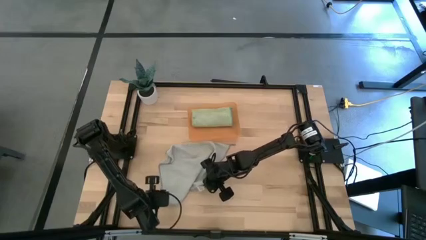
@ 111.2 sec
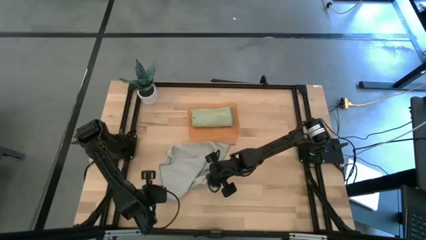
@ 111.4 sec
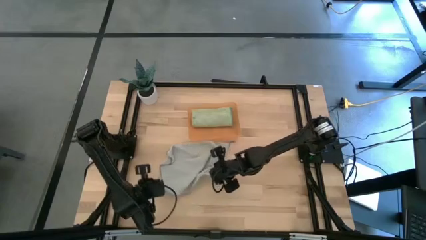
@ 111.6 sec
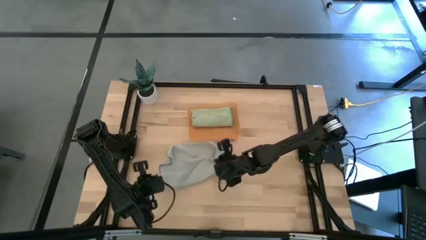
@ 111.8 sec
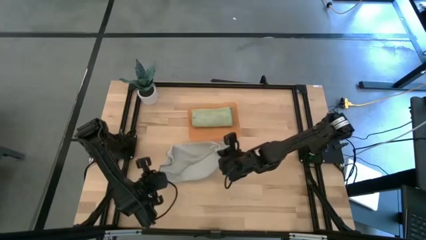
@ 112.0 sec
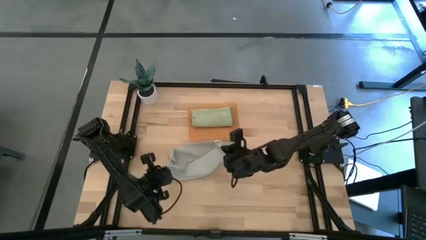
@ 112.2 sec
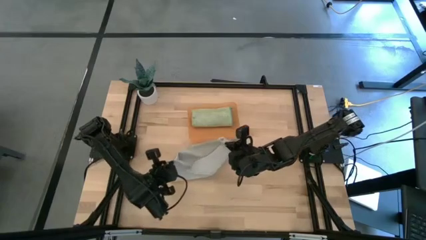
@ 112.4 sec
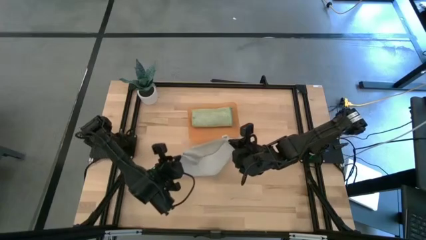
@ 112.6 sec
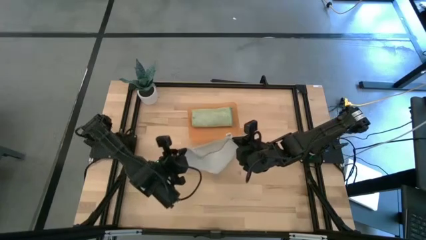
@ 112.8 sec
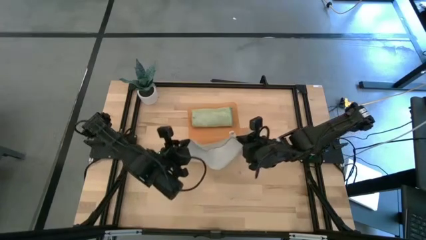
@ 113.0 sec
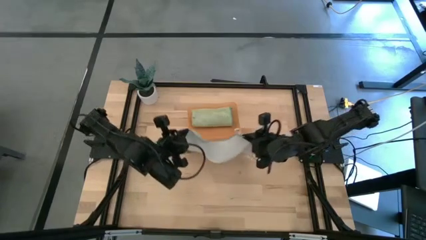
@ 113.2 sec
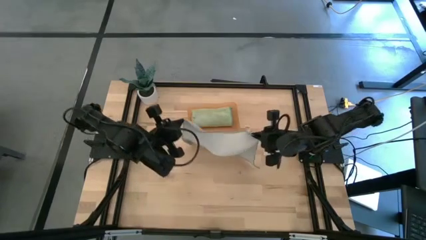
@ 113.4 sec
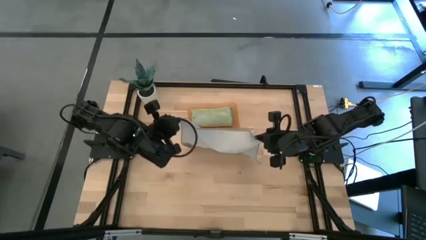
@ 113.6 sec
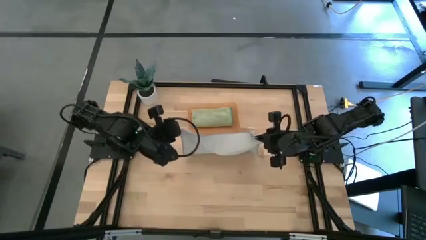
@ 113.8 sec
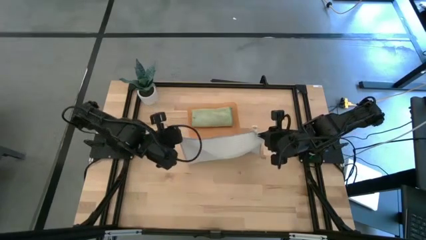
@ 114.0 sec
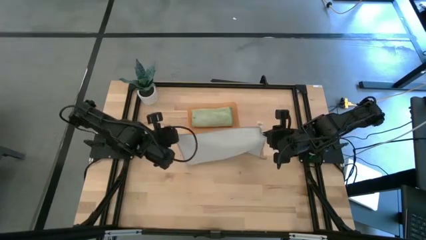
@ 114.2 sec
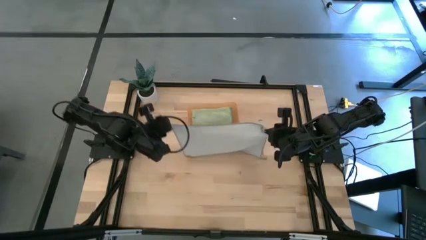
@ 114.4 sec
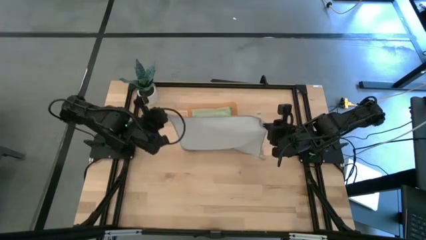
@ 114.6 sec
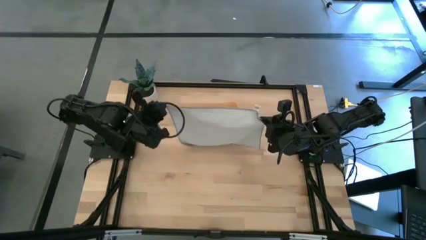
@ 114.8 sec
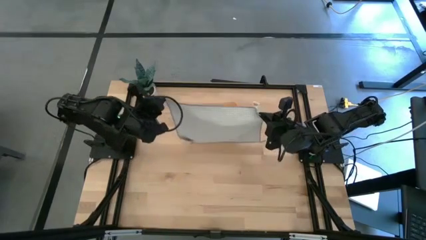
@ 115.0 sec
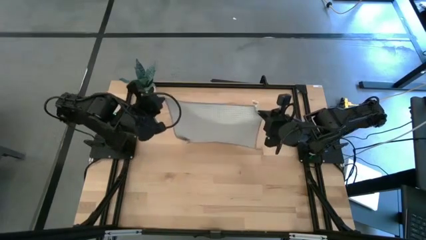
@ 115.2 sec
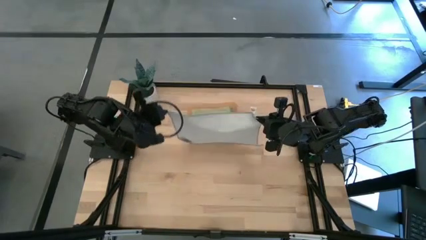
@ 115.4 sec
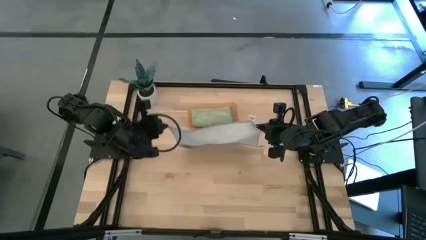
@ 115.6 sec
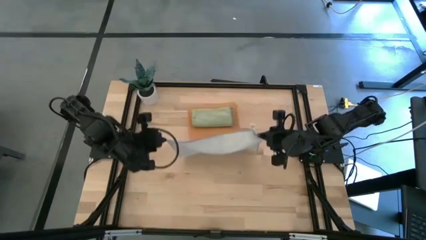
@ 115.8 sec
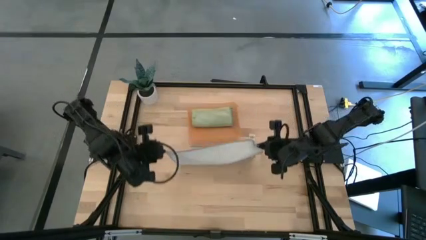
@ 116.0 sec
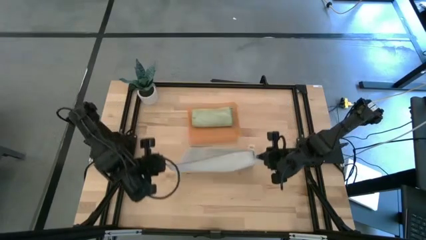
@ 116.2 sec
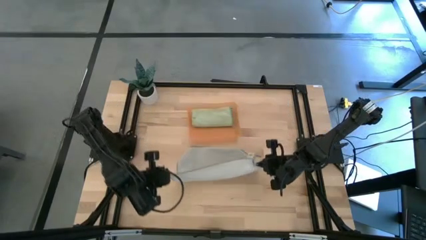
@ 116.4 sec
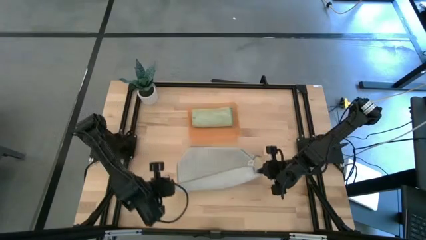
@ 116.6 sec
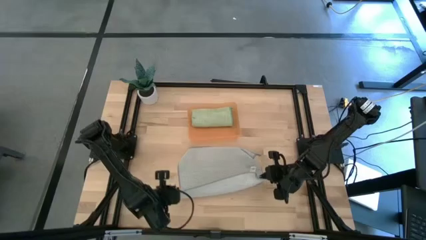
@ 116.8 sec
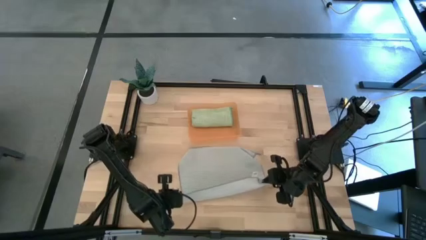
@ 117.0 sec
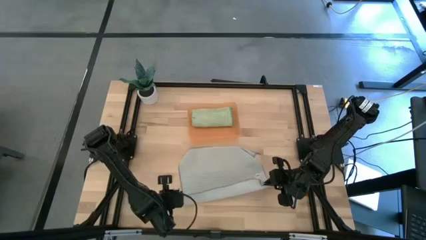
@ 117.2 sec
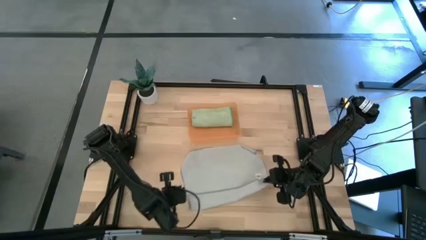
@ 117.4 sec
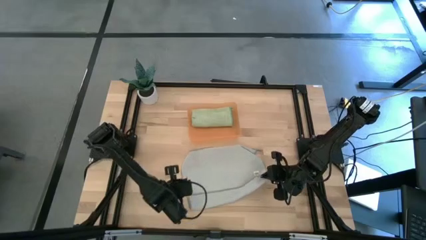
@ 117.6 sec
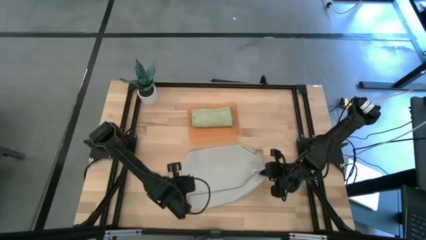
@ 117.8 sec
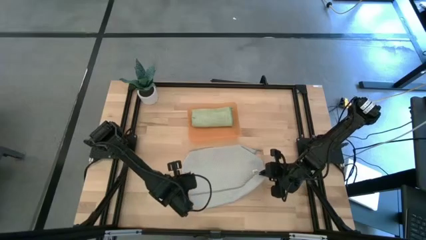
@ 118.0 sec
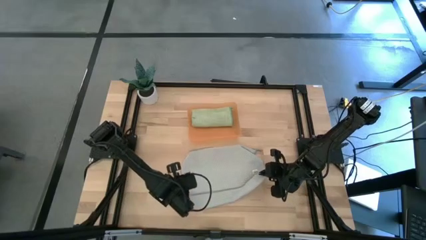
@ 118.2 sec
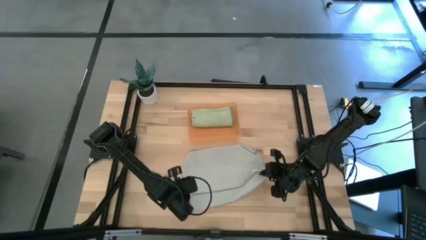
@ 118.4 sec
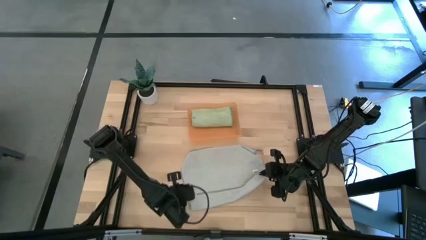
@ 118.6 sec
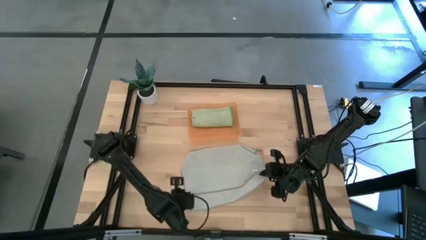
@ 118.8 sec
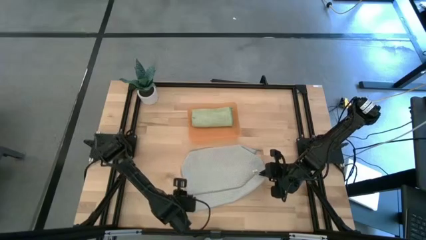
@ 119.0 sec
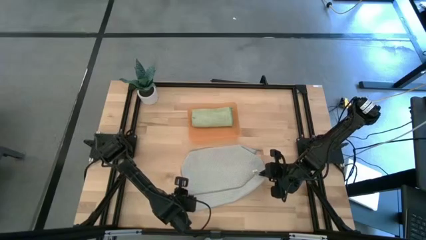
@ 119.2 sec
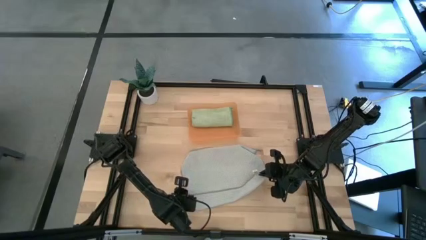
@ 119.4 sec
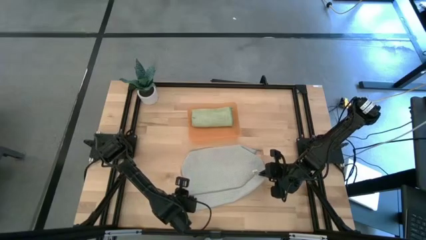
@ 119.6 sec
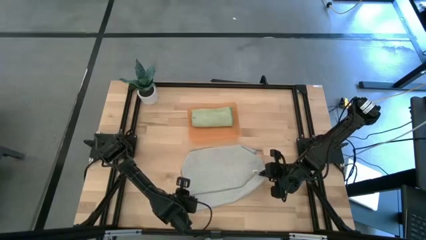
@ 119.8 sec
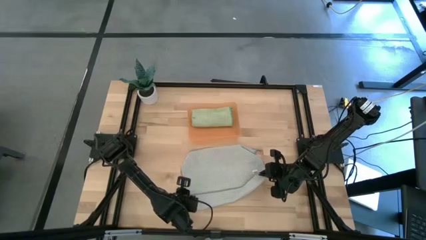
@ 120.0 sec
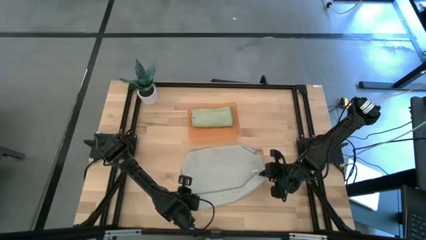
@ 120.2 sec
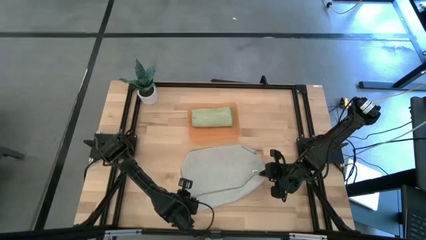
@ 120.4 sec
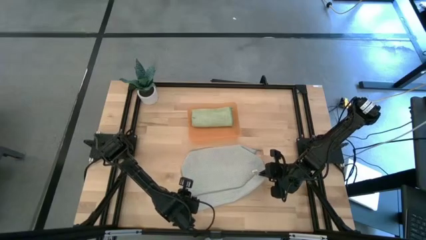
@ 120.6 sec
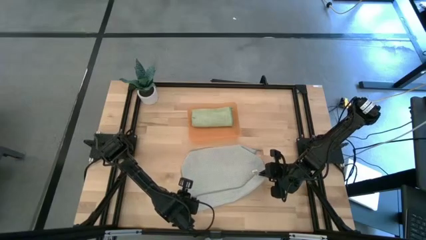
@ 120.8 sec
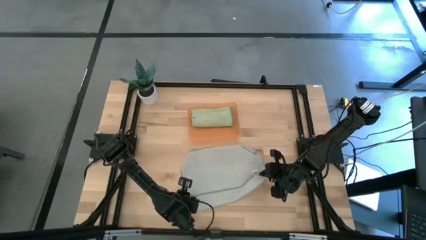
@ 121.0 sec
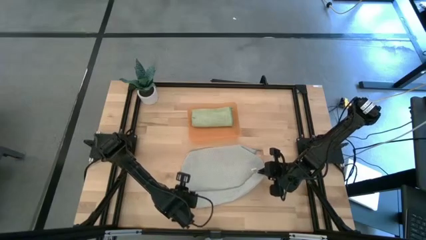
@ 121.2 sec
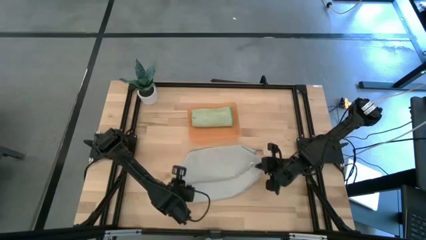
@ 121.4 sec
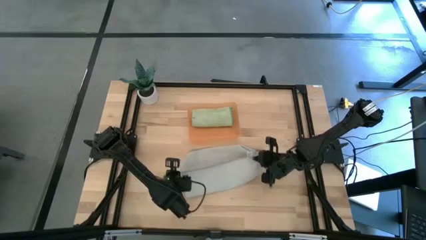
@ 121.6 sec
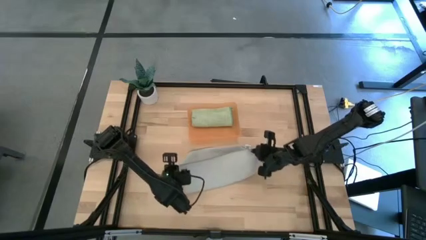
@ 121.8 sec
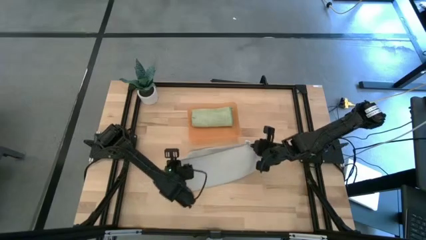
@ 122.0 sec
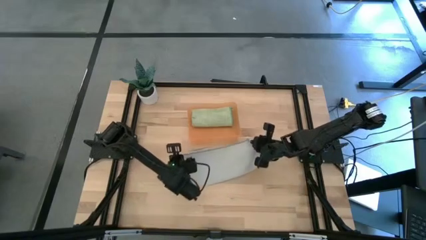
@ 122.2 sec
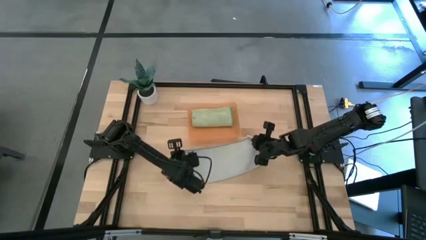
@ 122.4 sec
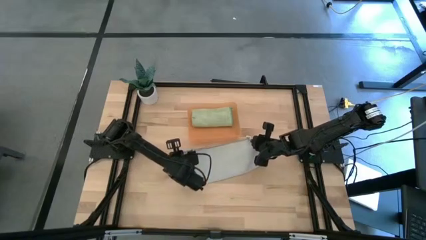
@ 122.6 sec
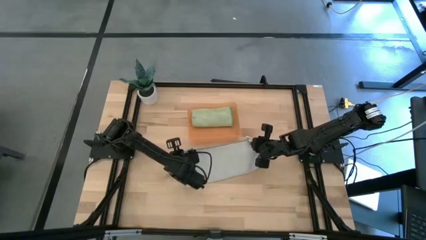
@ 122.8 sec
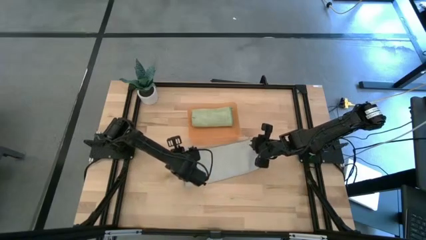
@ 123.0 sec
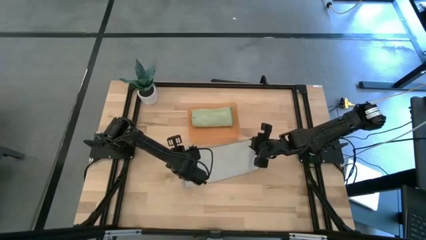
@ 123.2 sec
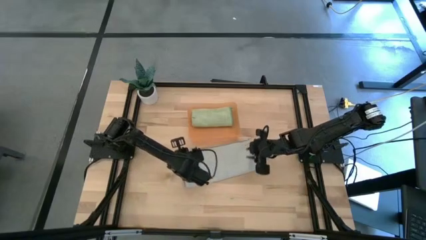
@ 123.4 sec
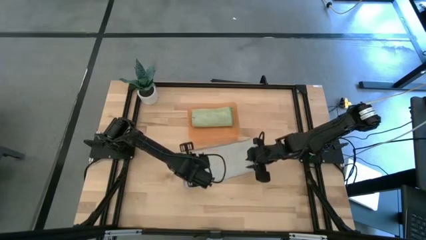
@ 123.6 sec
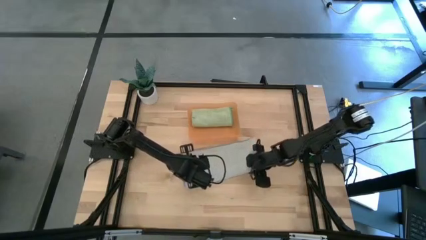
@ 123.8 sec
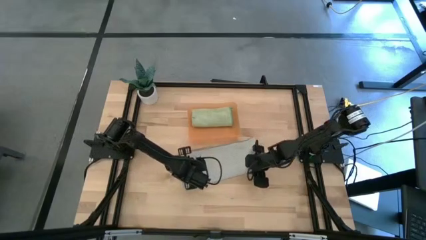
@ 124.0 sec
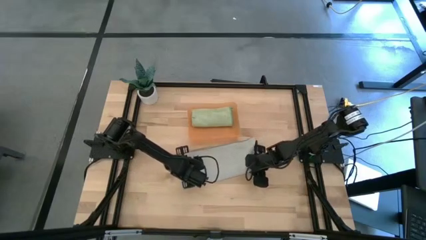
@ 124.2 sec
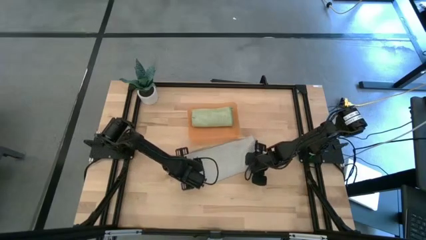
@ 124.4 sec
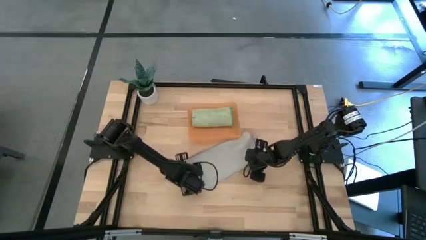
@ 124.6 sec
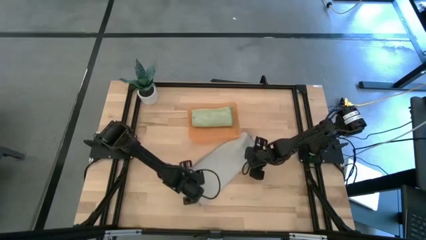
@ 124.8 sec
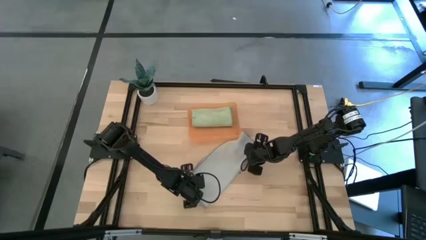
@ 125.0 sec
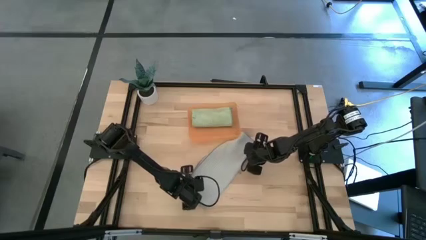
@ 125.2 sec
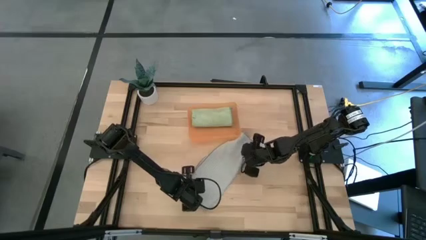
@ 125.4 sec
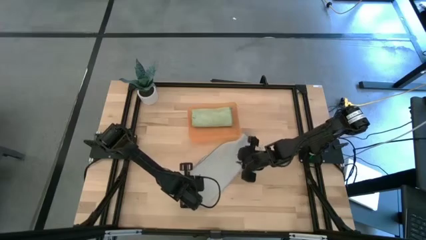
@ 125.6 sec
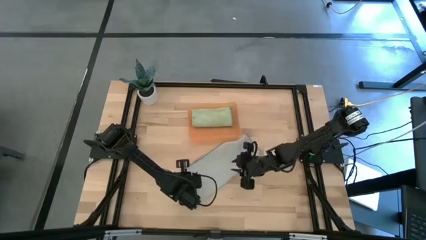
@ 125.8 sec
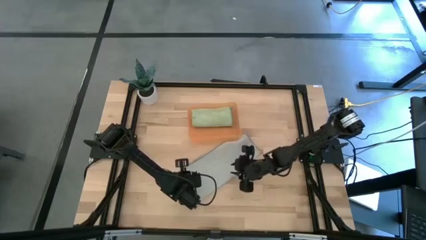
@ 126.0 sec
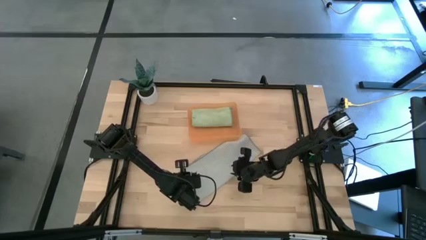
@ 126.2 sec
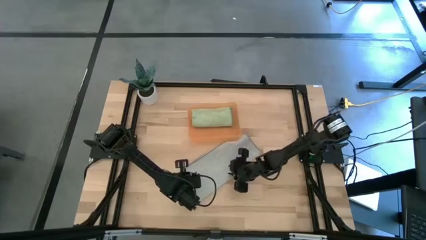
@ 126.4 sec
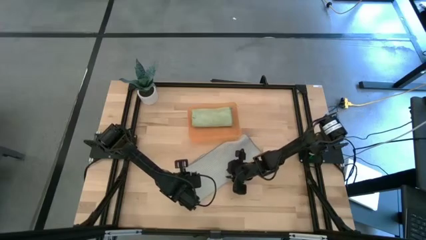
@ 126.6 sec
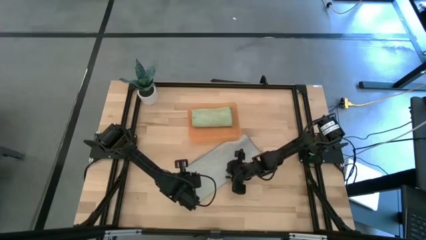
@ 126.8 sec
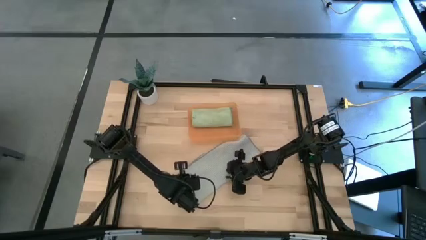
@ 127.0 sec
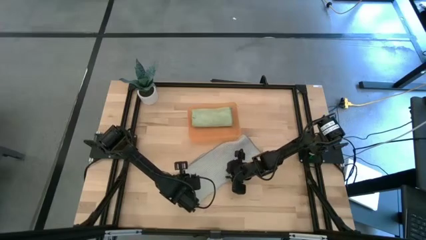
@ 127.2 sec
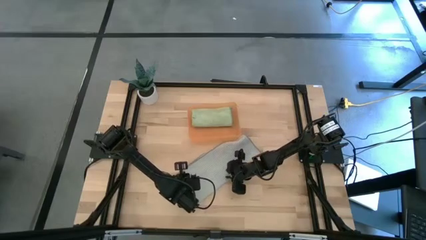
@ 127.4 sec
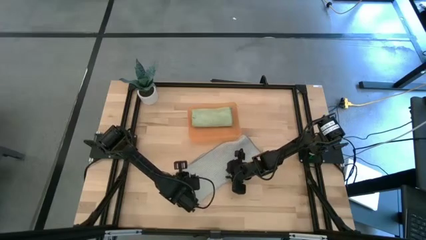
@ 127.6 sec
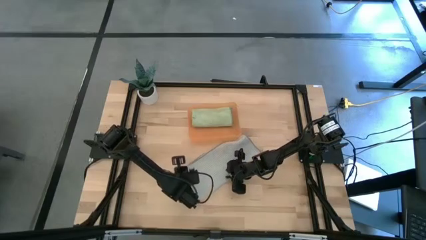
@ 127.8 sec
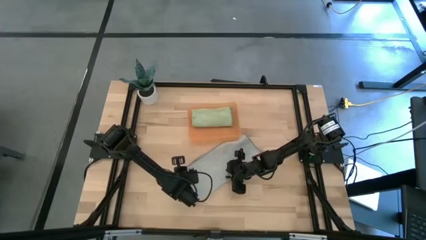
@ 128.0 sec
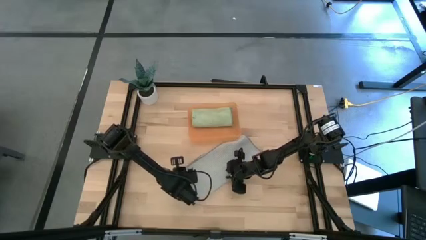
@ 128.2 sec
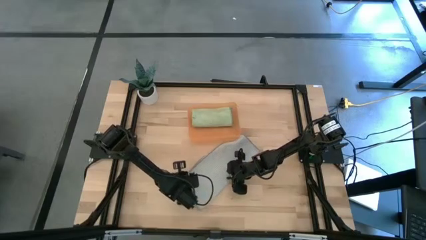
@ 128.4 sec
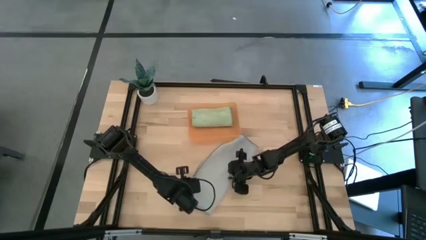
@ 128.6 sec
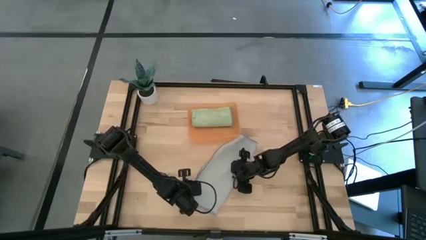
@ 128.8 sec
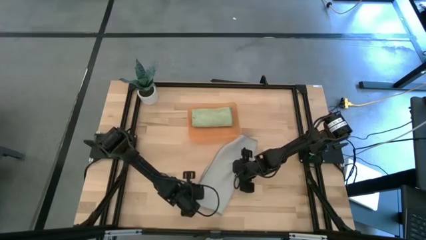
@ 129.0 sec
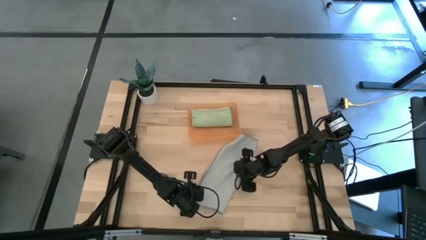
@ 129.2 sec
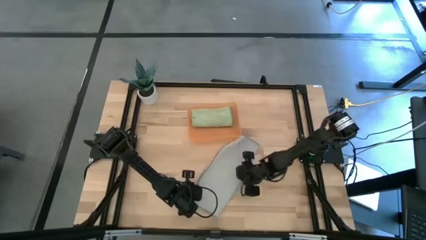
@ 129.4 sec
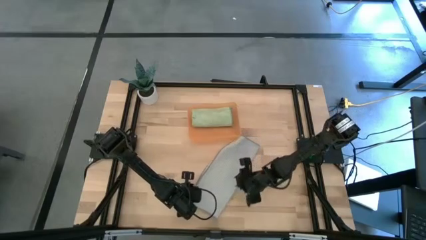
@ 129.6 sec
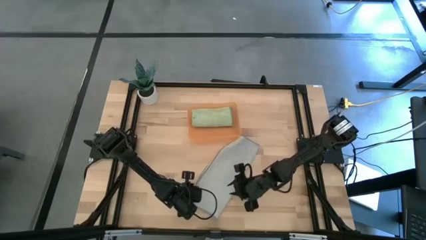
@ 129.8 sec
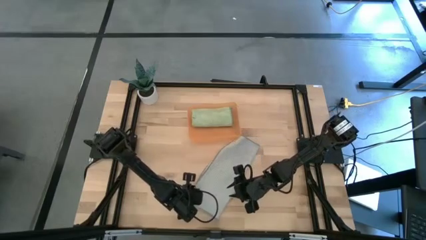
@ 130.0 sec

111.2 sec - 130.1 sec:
Task: Roll microfiber towels into tight, uniform cylinder then place into a basket
Fold the gray microfiber towel
